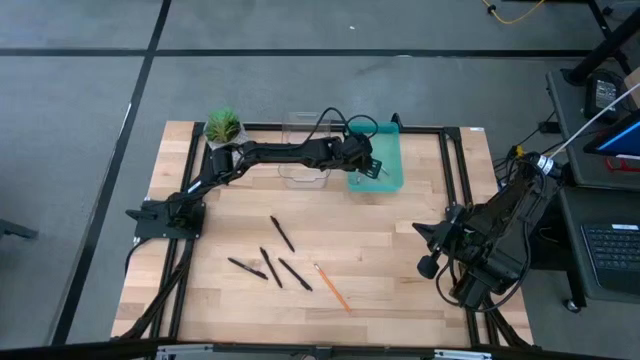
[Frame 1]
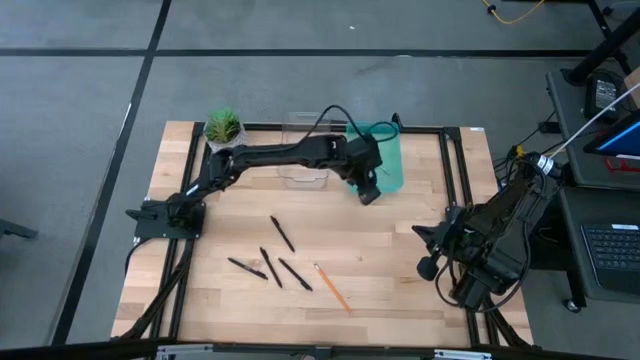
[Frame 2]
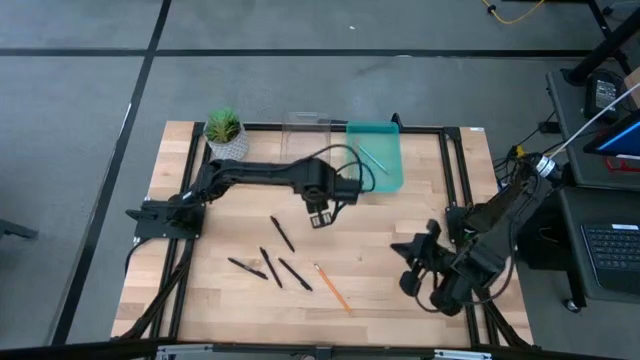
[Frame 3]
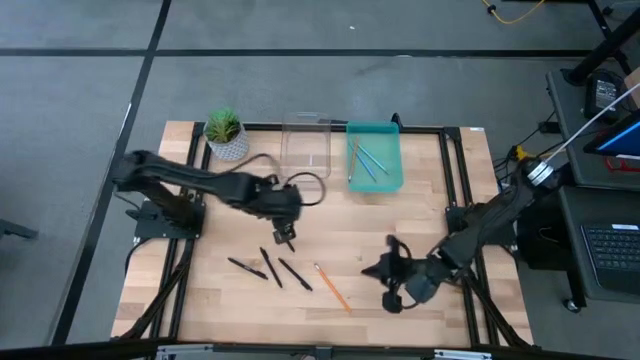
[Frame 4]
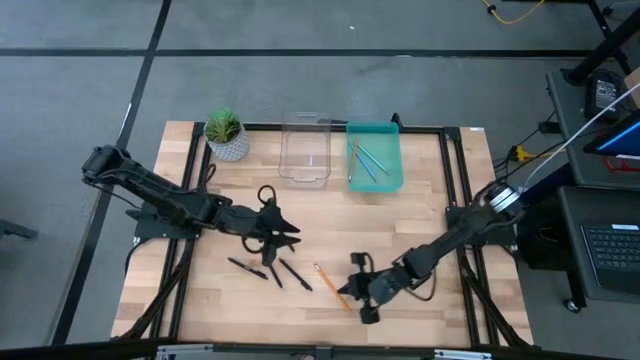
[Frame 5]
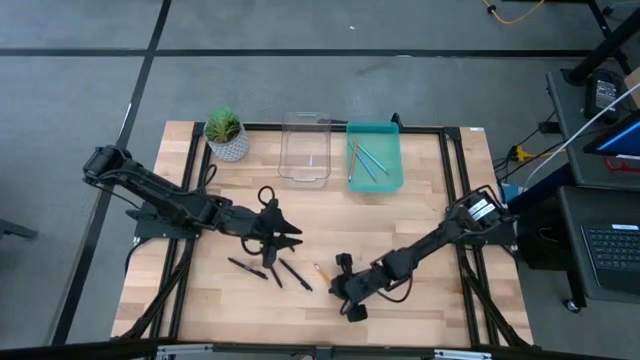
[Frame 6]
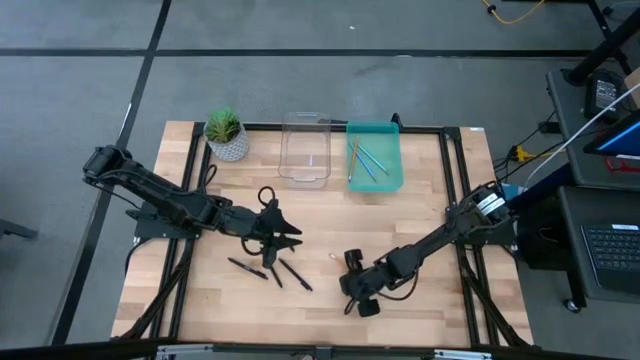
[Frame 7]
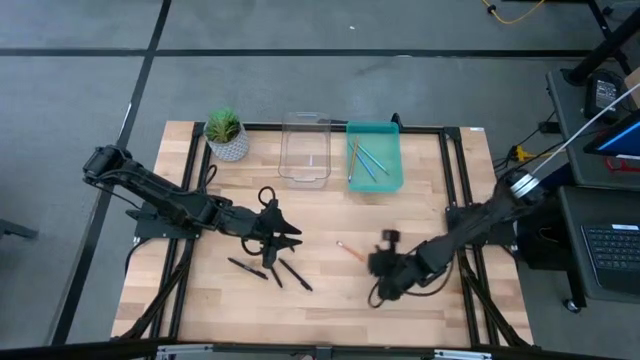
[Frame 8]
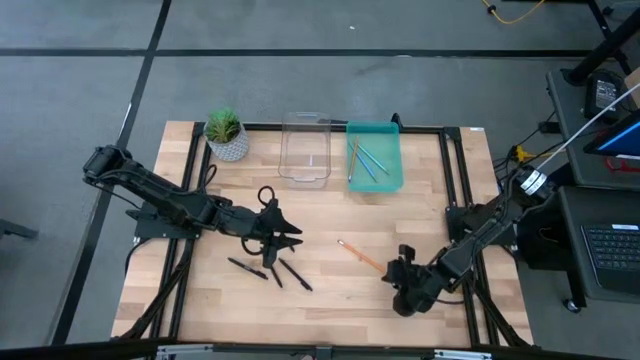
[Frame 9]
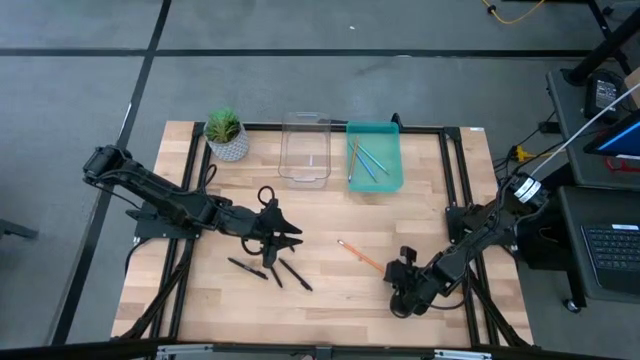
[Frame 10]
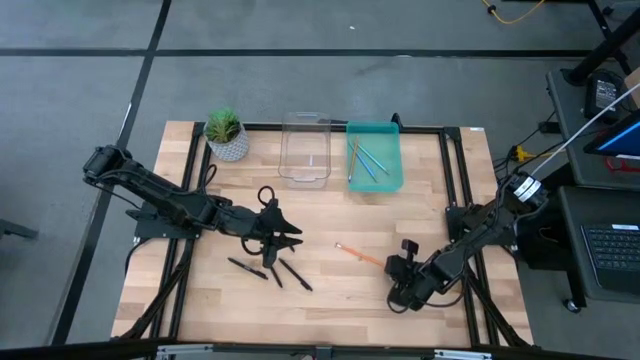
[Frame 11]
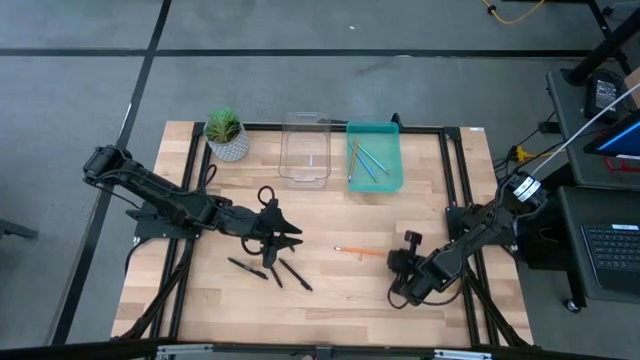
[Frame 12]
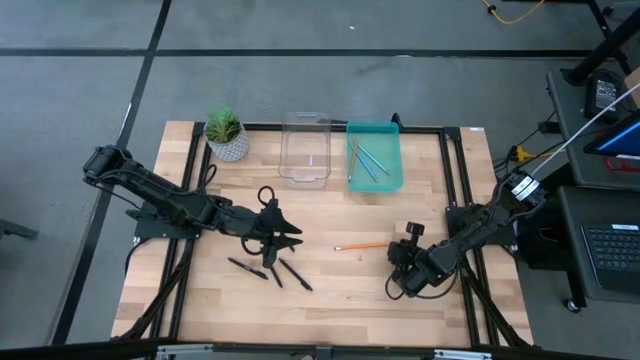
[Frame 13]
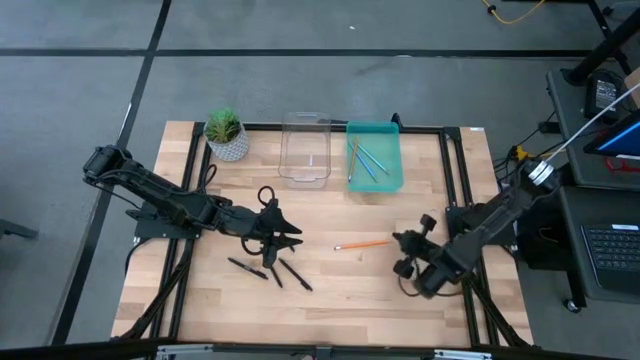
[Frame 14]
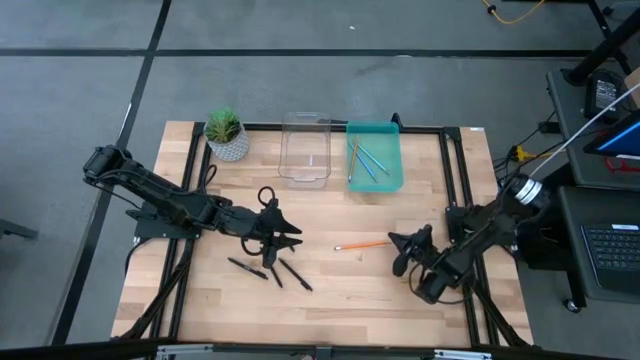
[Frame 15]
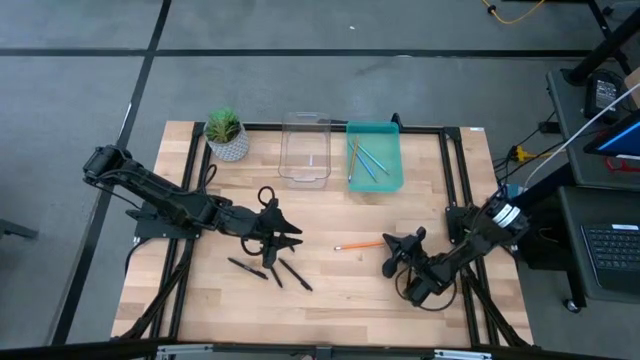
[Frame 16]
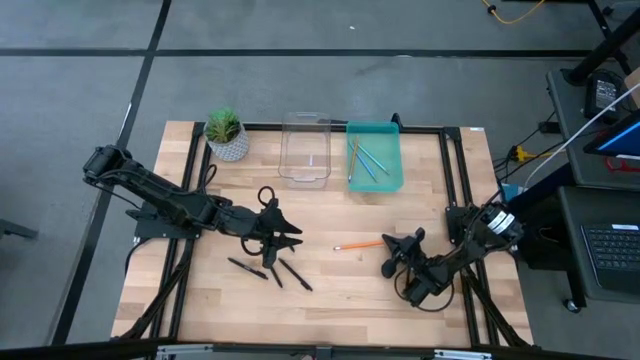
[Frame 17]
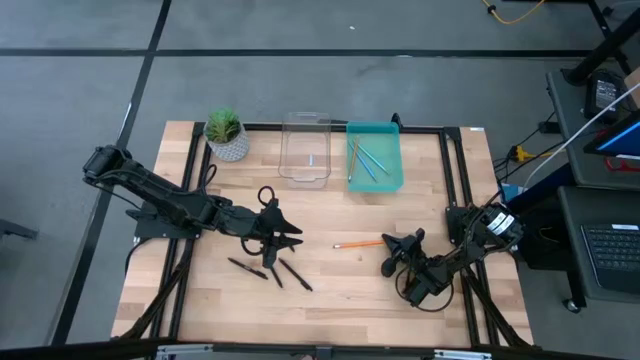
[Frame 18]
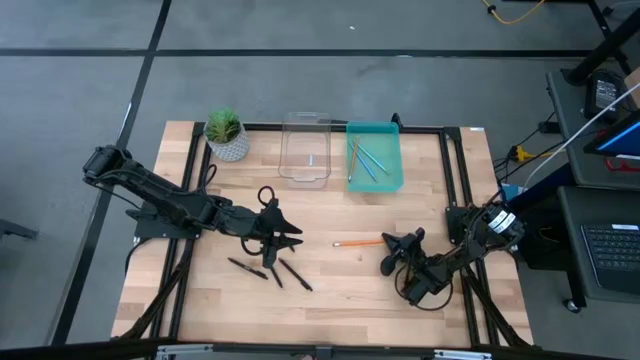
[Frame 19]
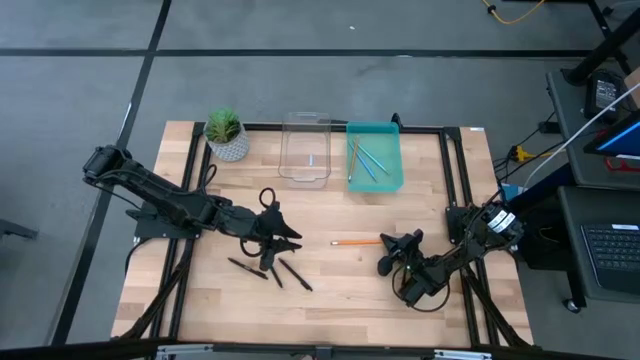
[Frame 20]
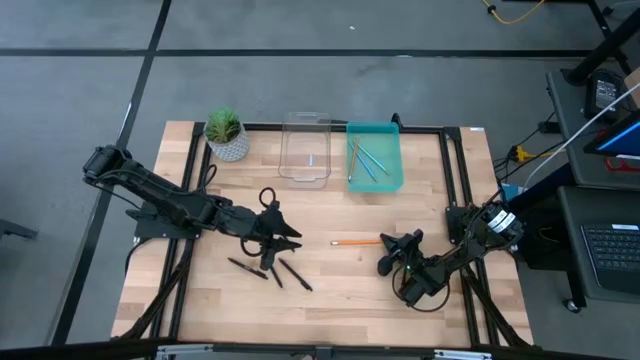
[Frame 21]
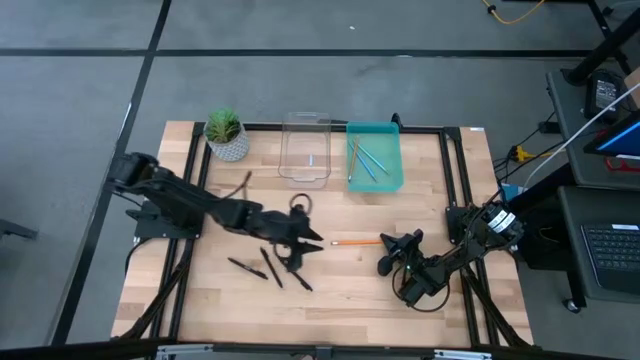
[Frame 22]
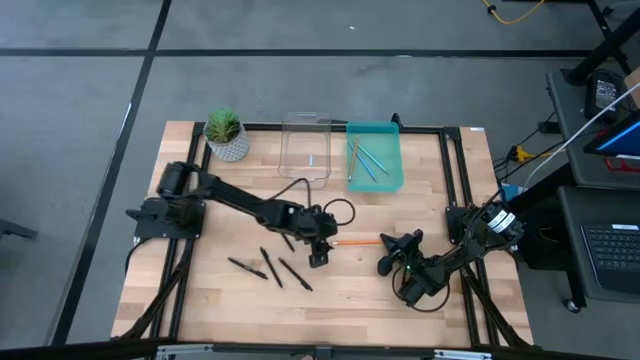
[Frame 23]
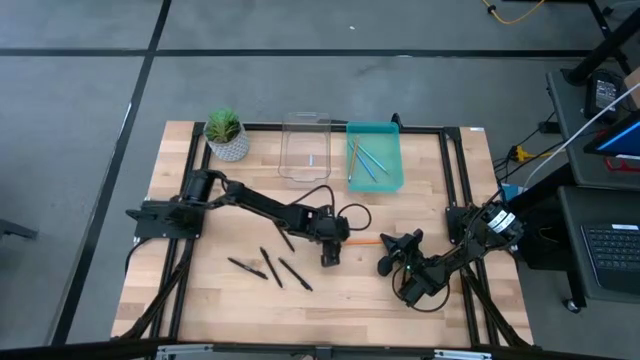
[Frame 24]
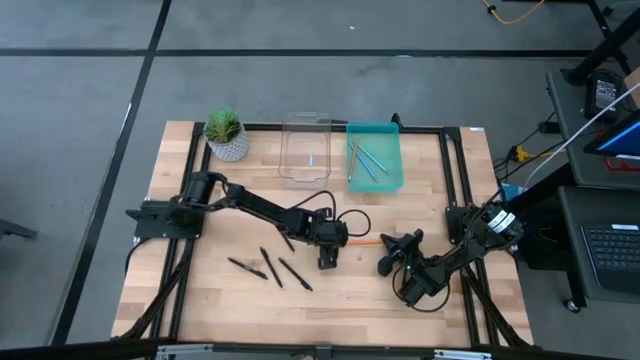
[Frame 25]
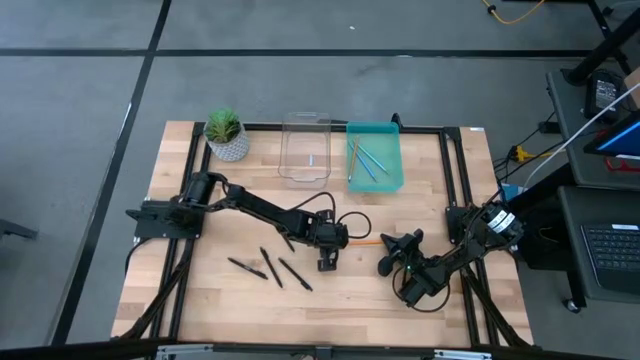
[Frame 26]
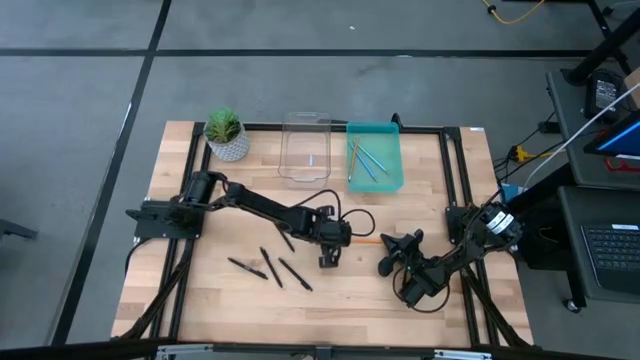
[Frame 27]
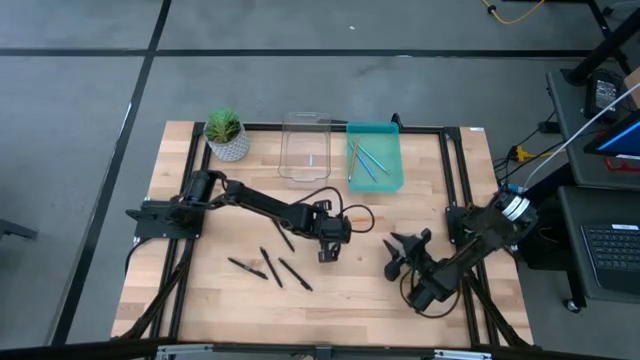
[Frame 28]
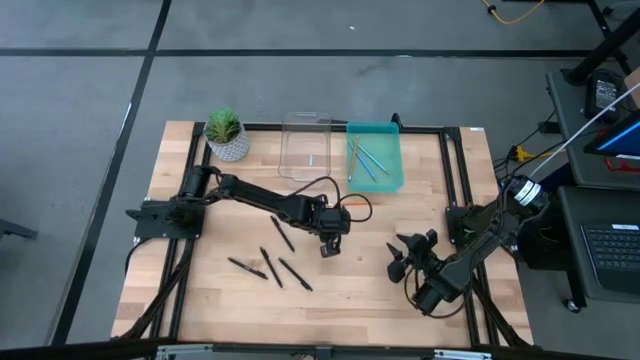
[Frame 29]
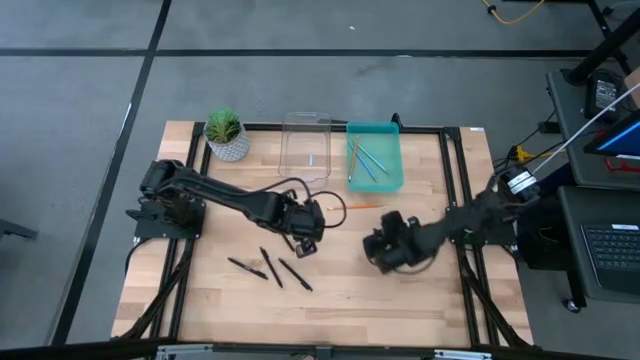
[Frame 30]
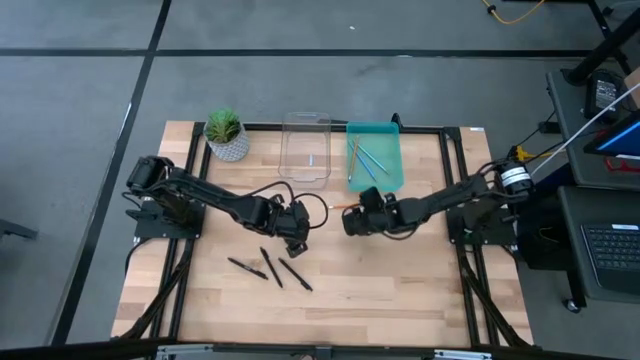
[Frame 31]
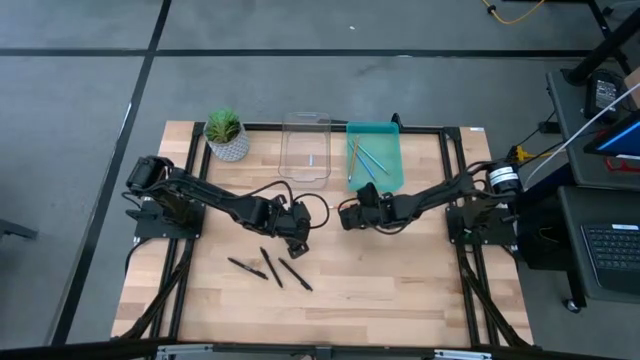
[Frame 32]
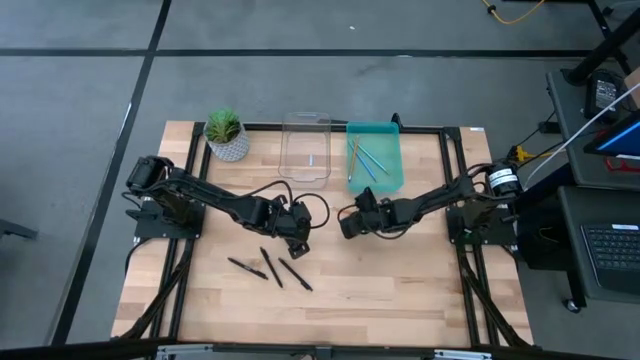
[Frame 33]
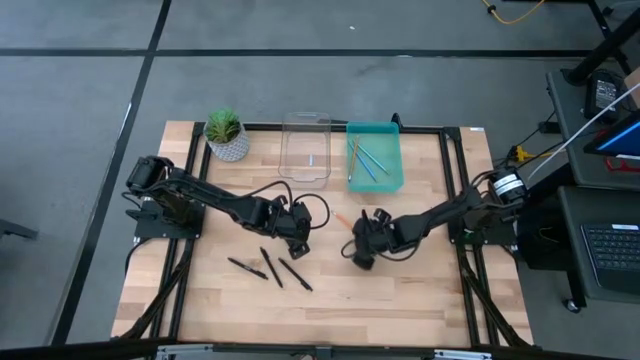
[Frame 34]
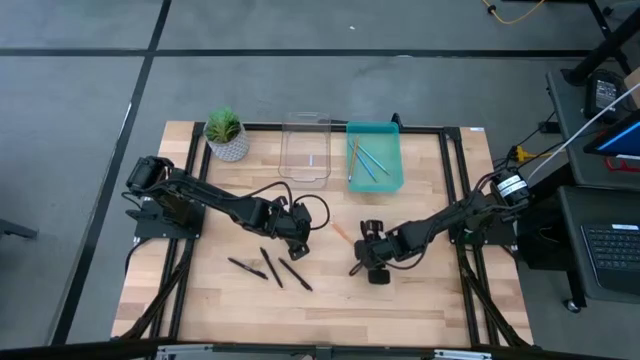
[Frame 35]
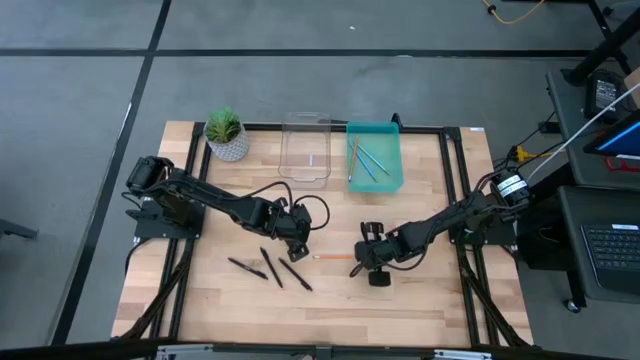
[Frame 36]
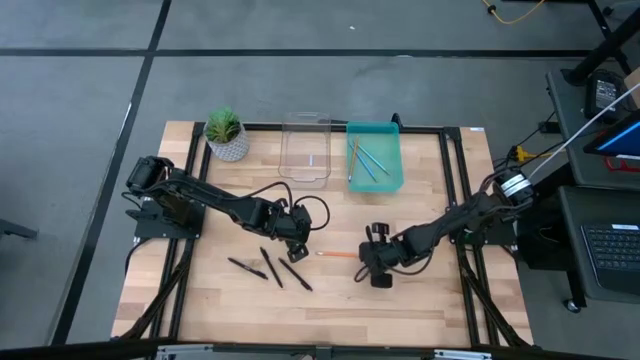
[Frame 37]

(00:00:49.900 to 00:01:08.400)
Task: Sort pens & pencils
Put the orange pencil into the blue bin

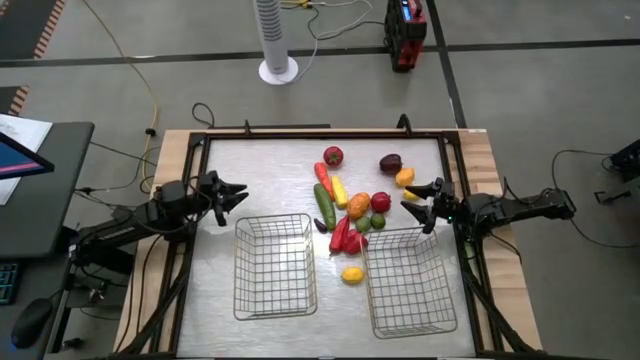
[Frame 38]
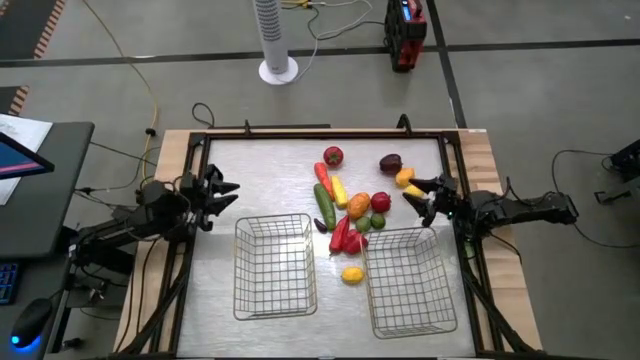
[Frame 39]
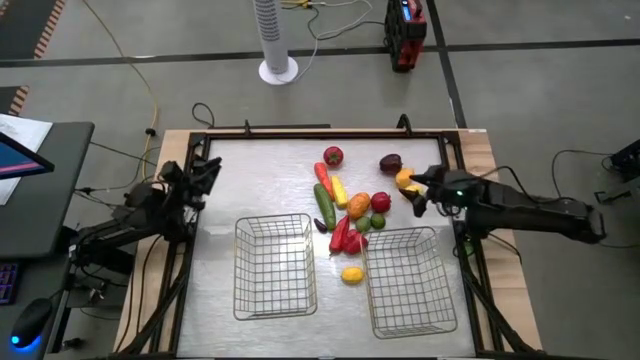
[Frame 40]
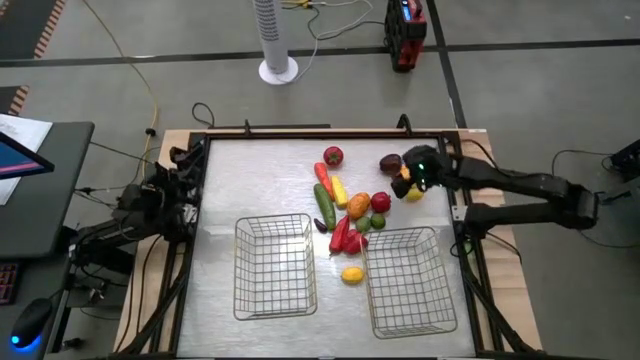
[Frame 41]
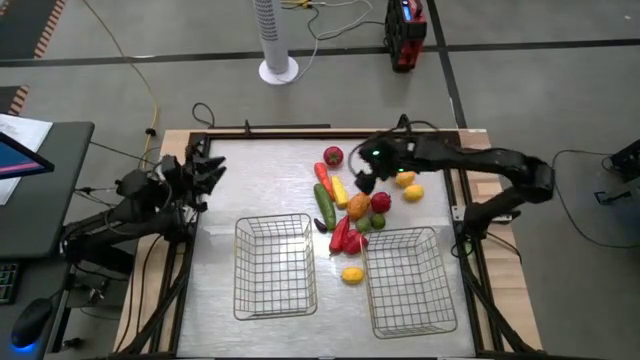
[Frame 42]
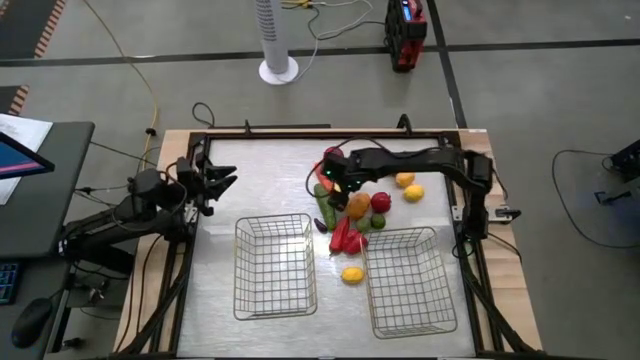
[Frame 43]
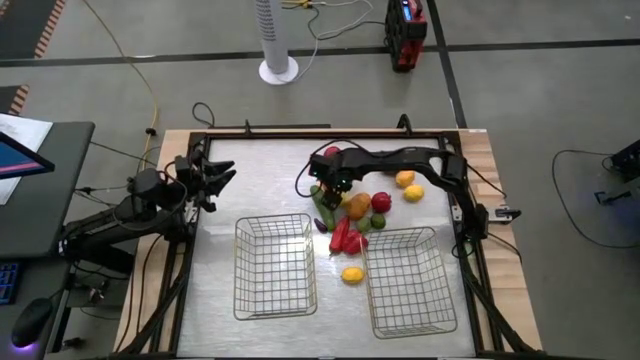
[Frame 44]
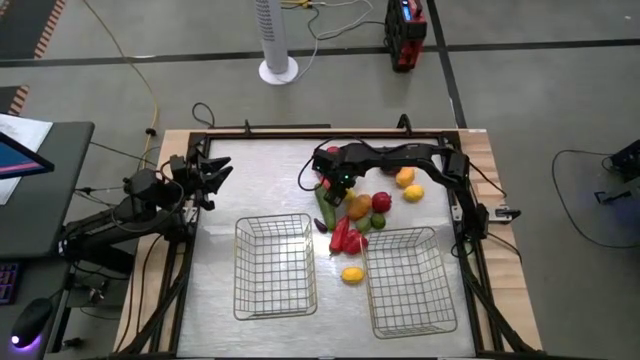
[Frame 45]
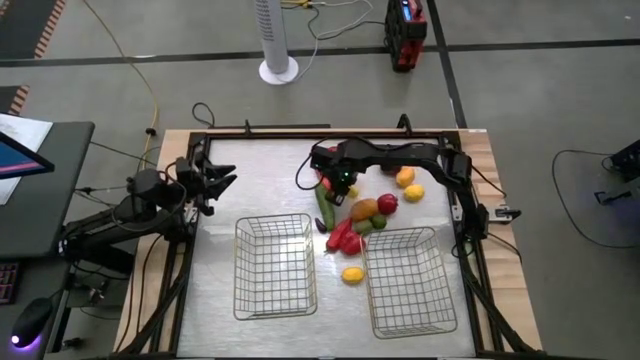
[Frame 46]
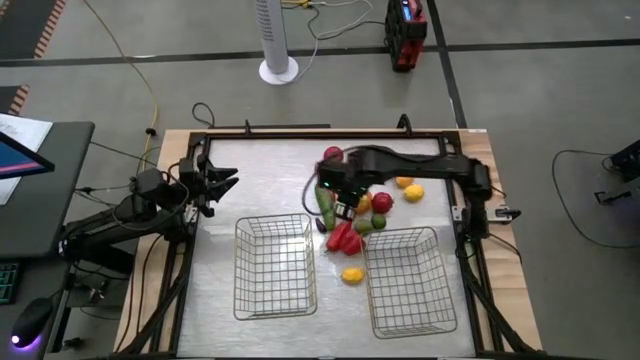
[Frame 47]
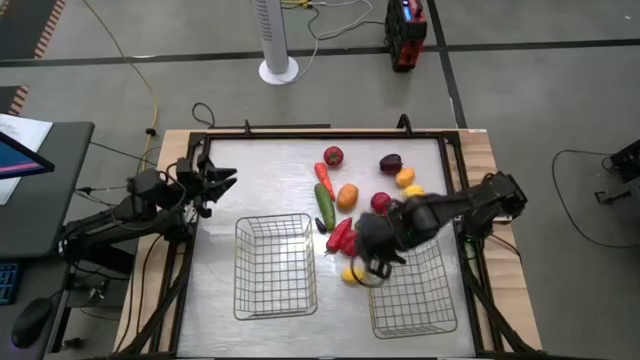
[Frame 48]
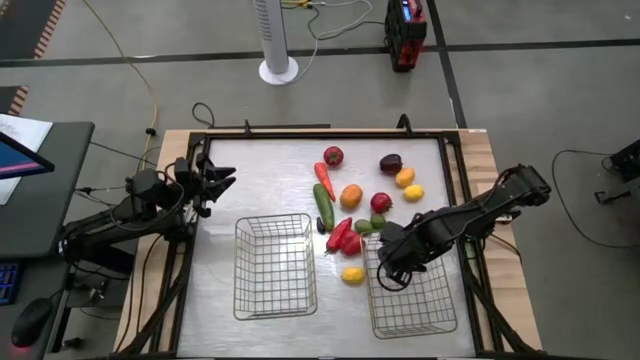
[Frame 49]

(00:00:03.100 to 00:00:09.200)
Task: Sort produce into baskets
Put the yellow corn into the right wire basket
